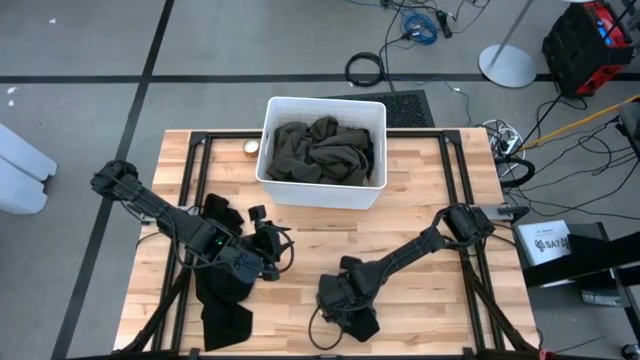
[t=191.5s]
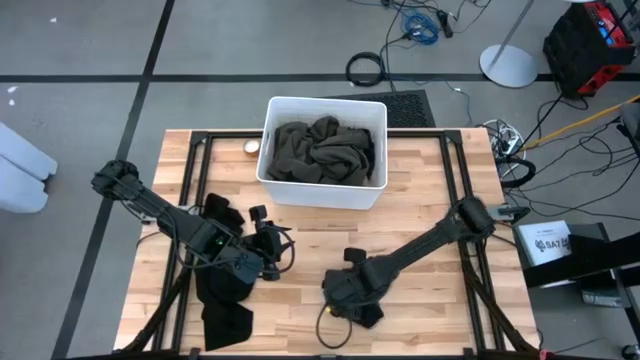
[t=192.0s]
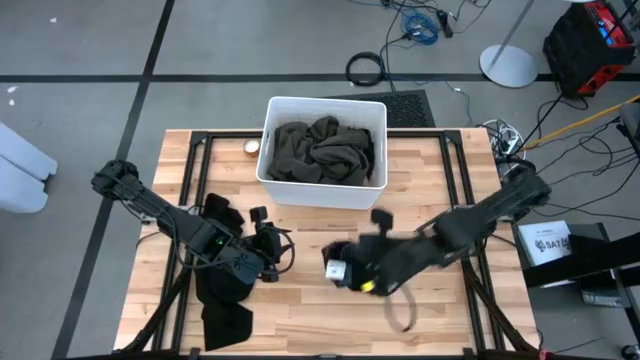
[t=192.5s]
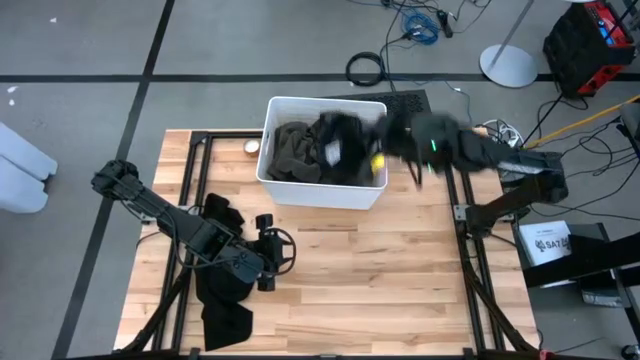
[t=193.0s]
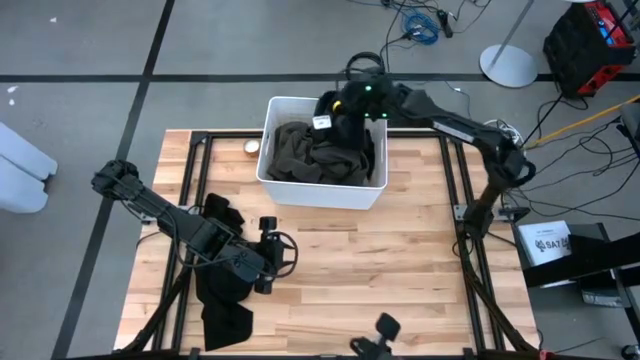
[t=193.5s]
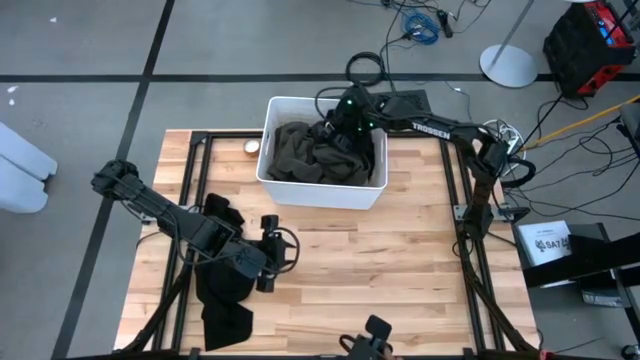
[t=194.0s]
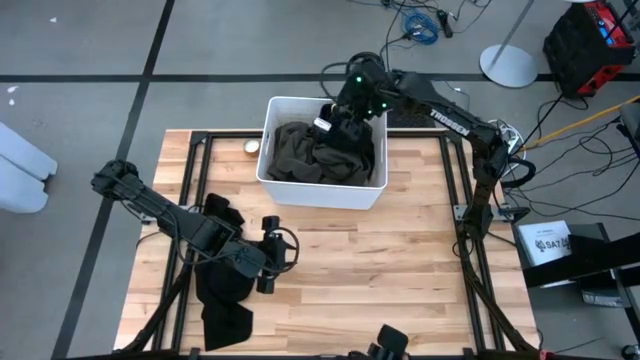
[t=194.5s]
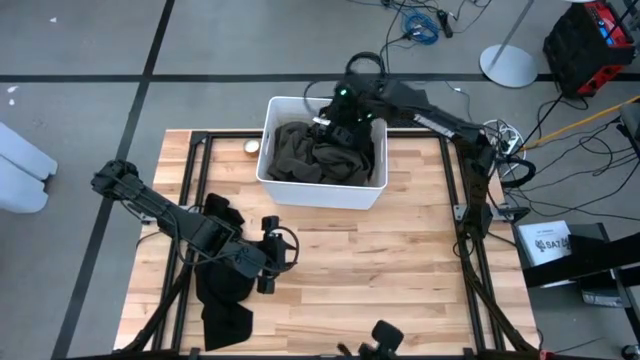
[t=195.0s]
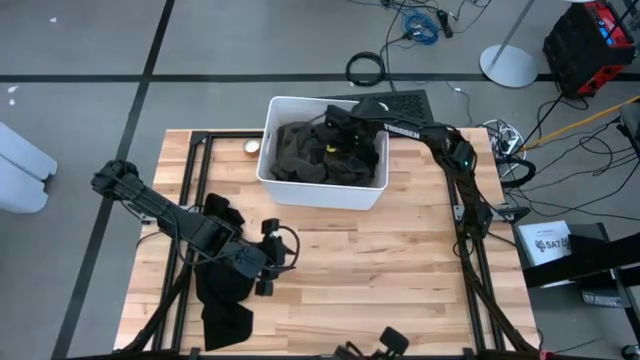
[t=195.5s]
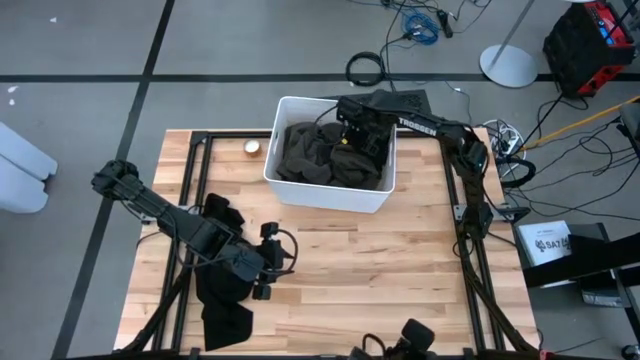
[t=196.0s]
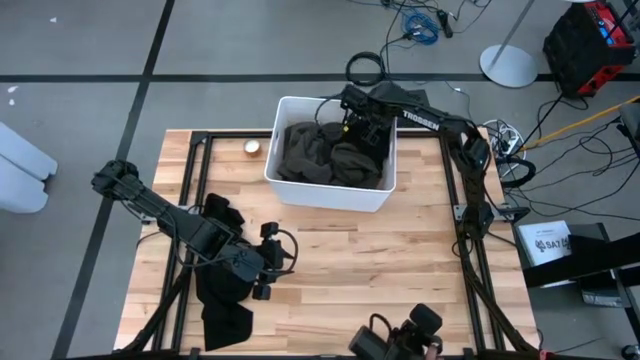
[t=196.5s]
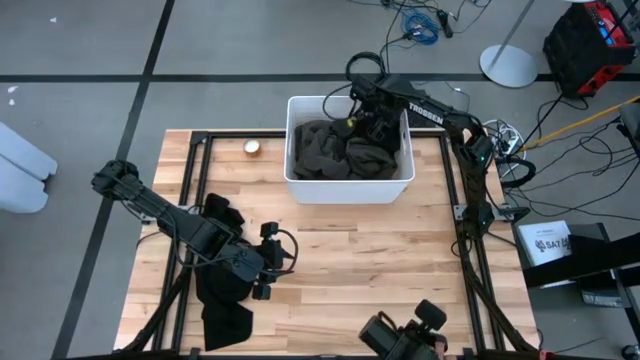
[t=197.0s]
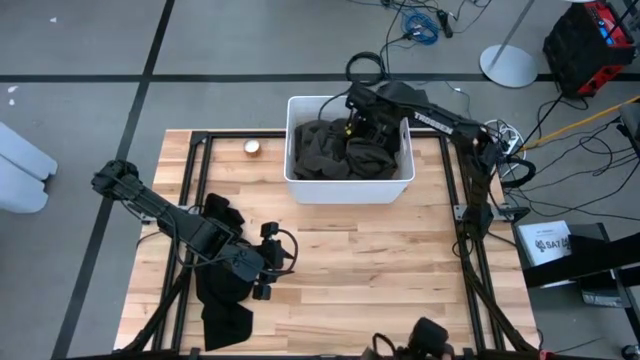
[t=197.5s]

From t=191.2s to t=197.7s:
Task: Fold laundry
Put the folded black underwear into the white laundry bin

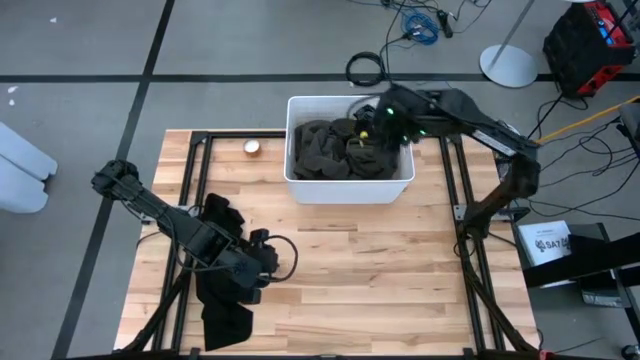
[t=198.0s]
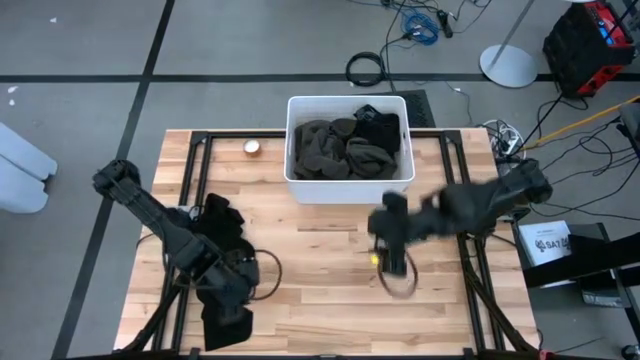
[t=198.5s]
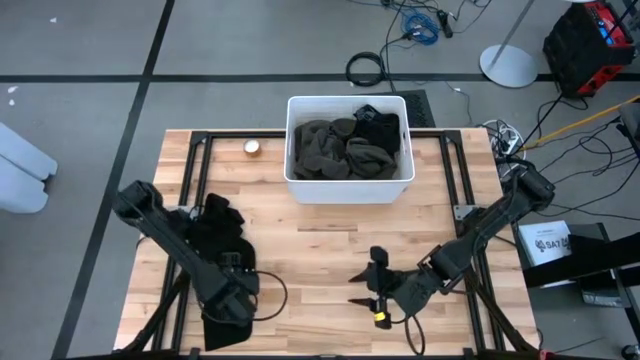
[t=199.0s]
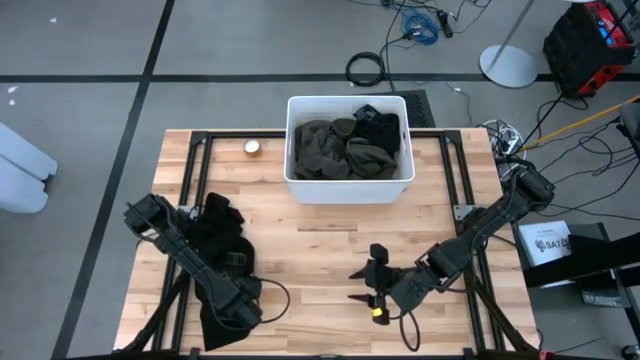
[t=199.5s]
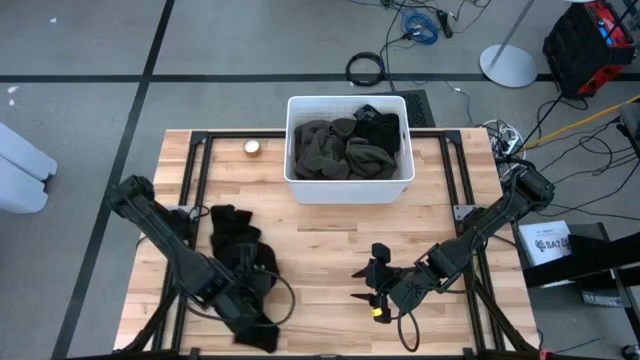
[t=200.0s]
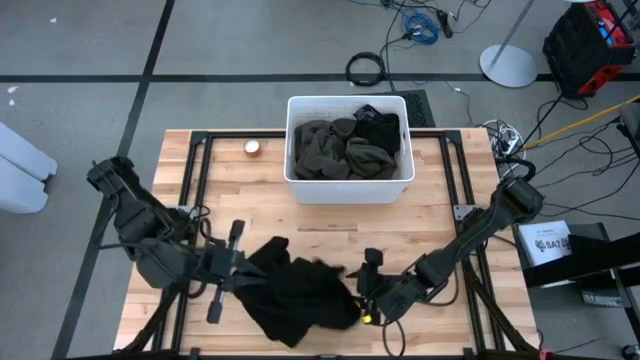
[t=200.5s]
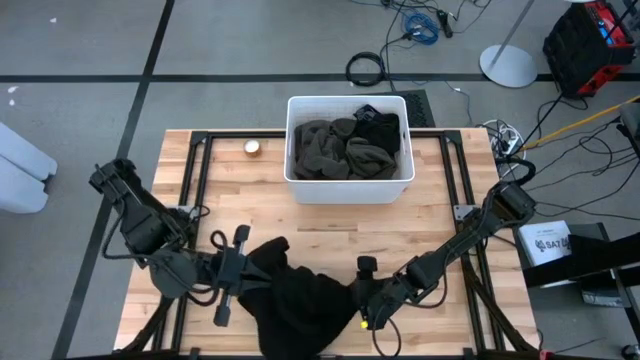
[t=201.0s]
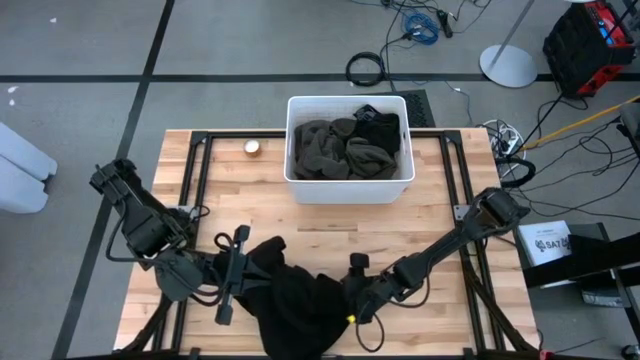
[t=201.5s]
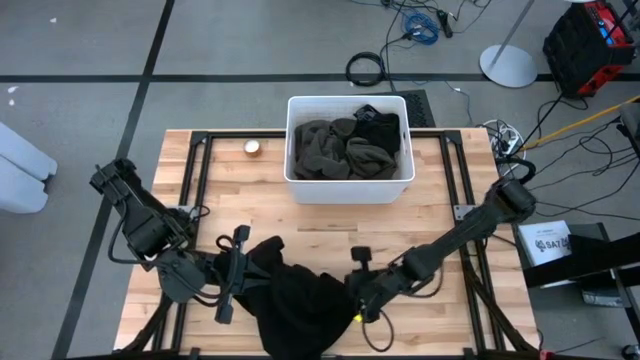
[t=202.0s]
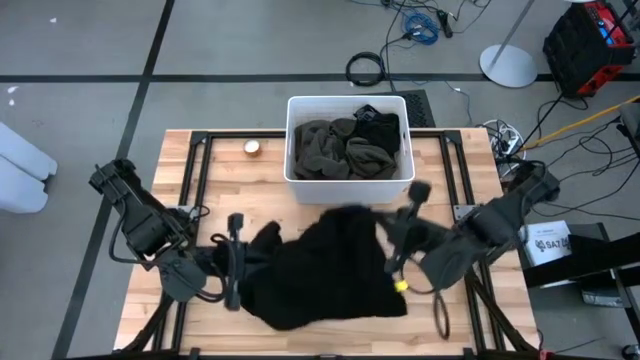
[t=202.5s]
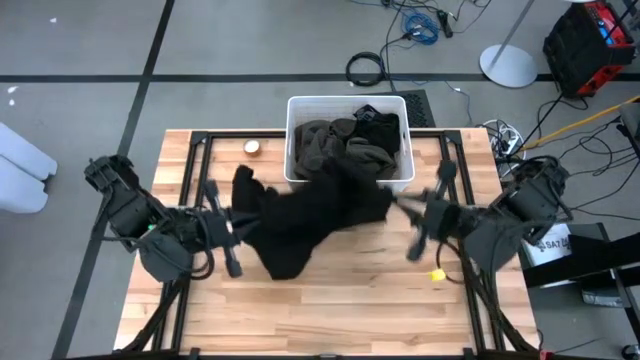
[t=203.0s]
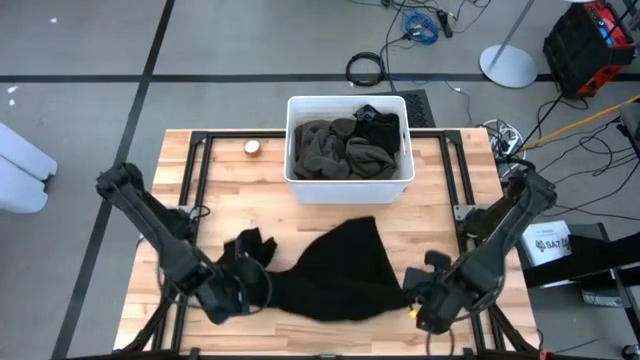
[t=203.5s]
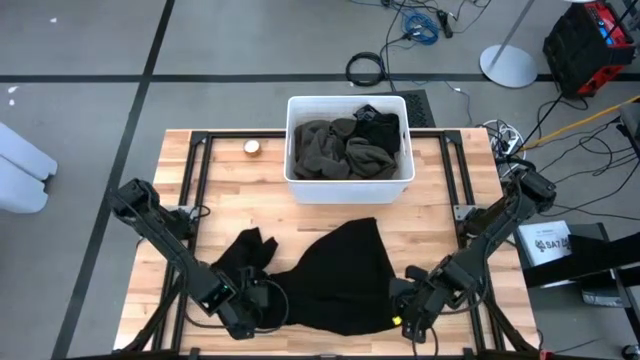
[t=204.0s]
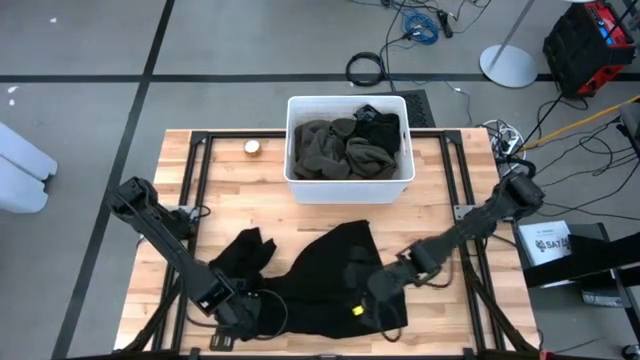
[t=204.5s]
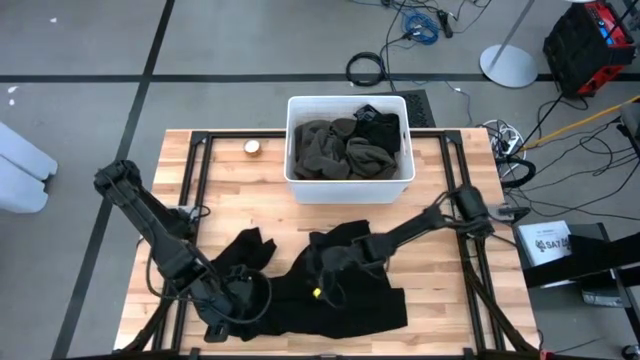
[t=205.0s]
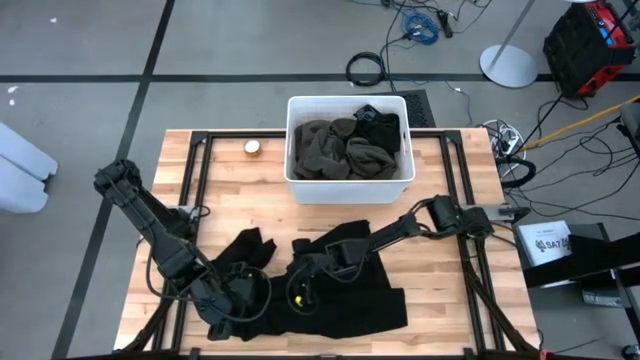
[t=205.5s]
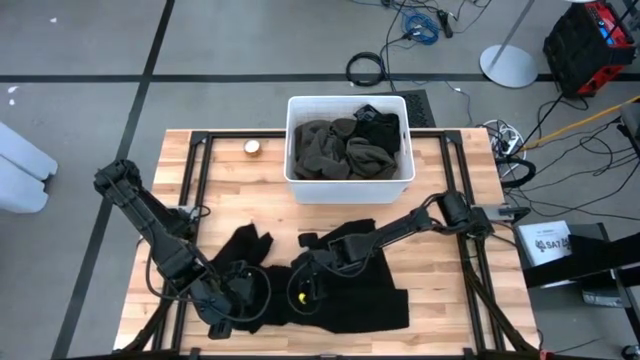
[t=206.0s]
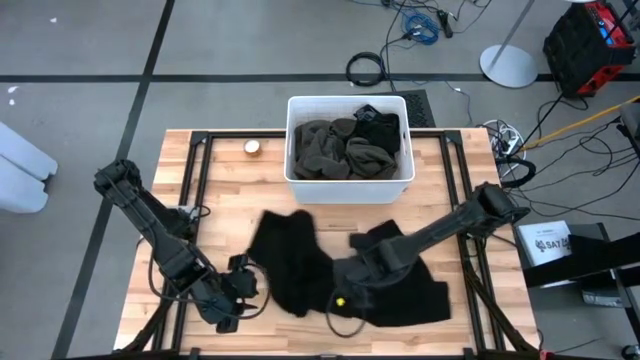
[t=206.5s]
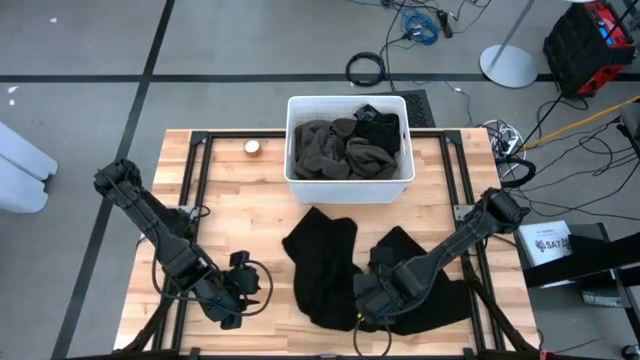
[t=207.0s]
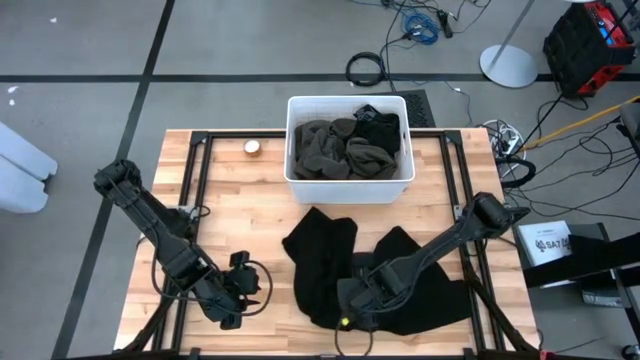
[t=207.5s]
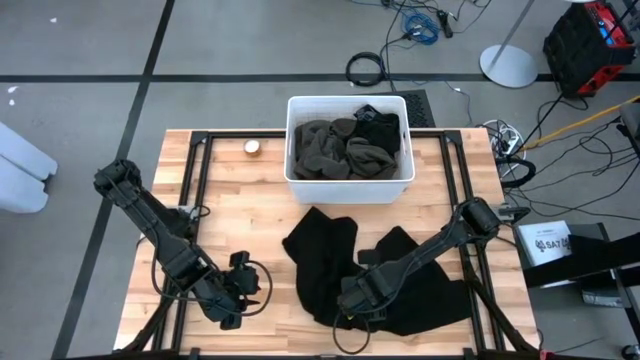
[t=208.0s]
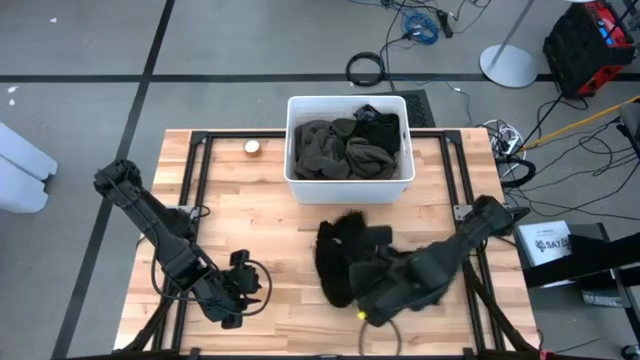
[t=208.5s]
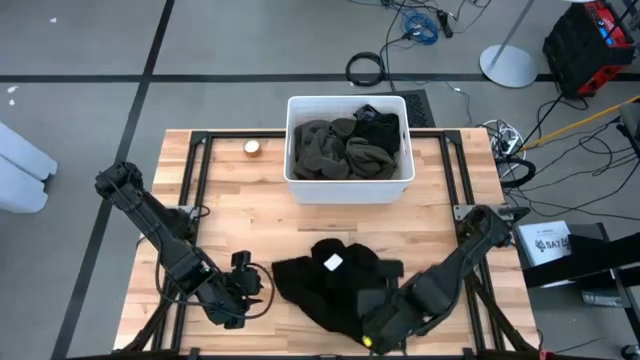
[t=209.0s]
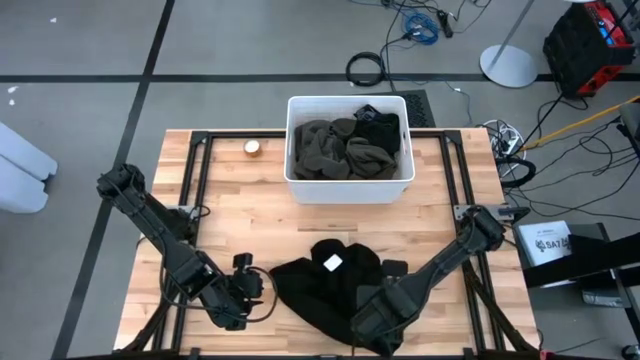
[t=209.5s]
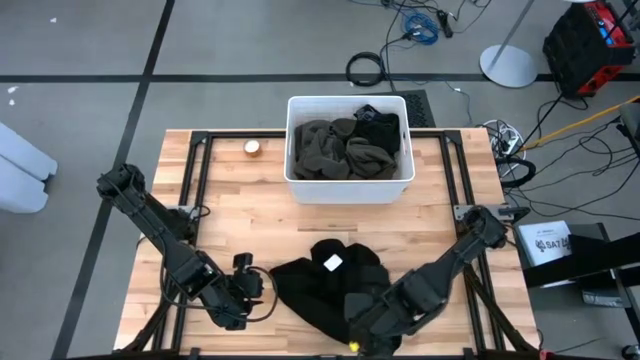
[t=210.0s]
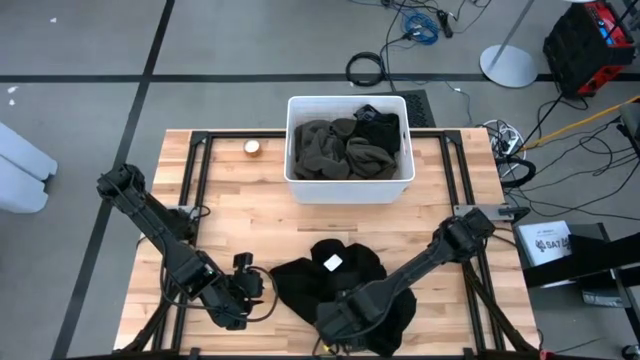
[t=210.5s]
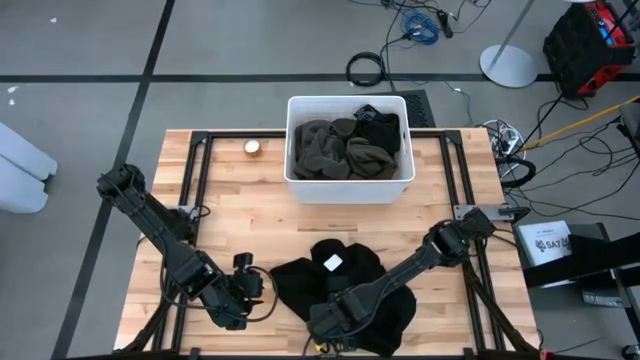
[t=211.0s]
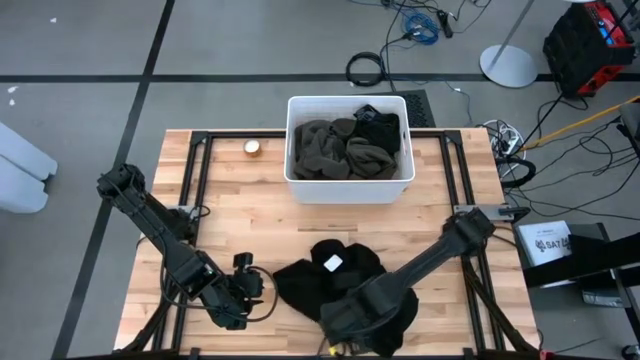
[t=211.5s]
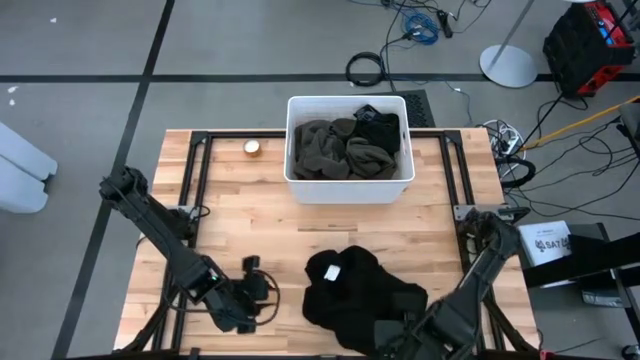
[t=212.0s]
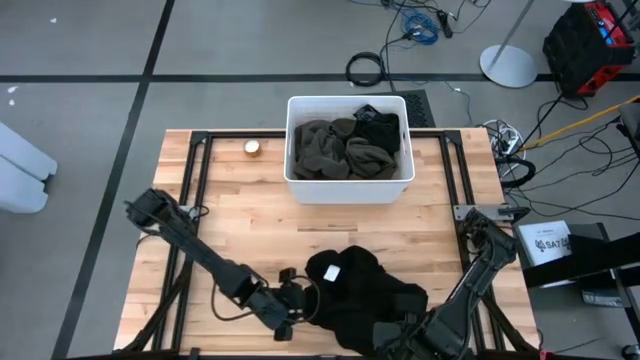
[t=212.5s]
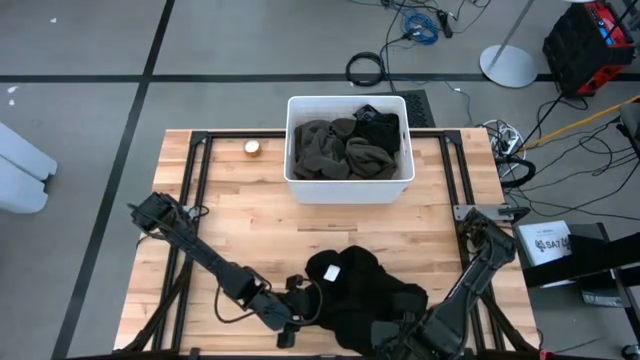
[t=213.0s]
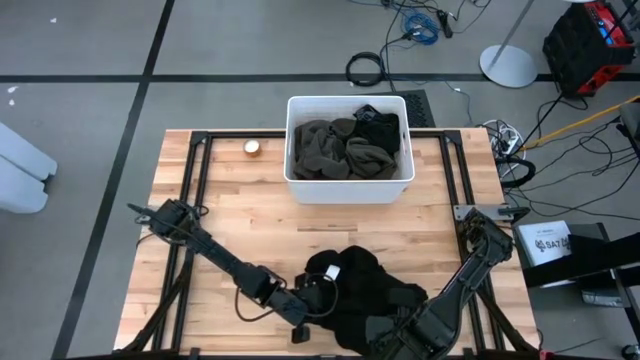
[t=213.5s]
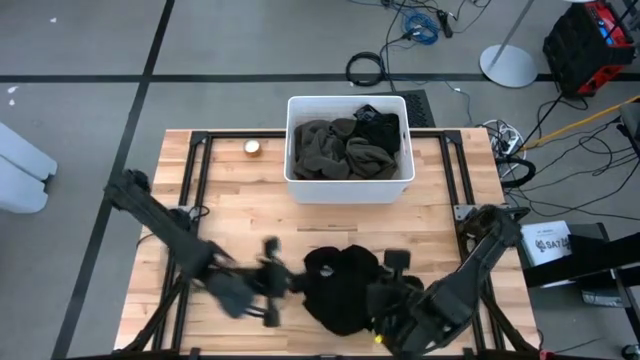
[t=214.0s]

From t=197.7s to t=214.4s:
Fold the black shirt
